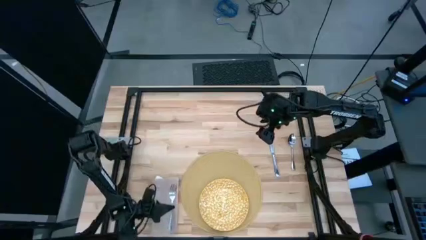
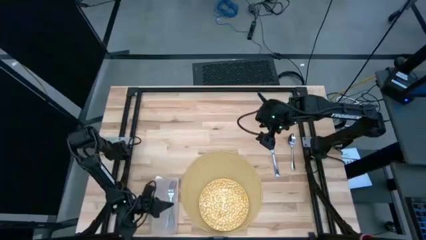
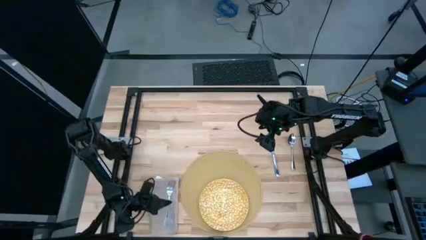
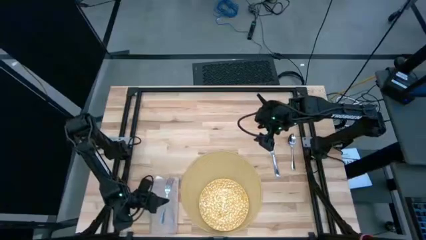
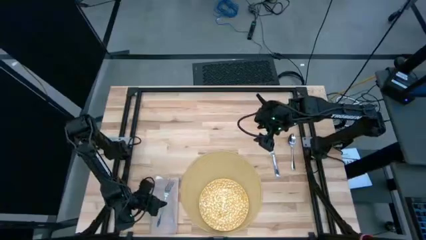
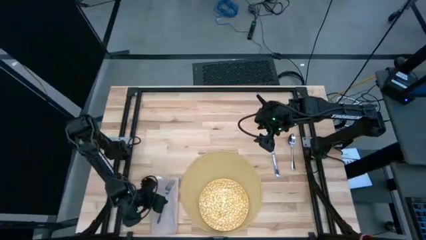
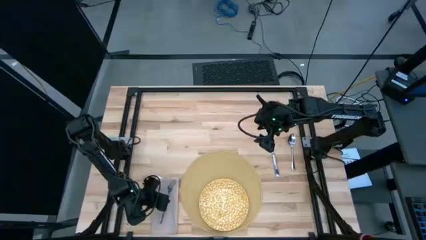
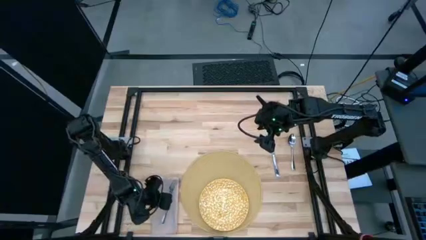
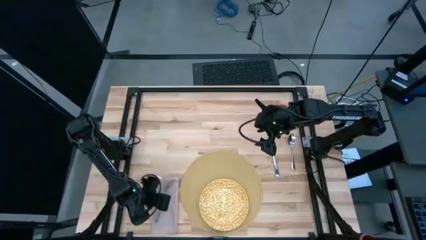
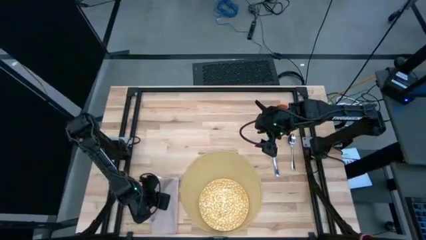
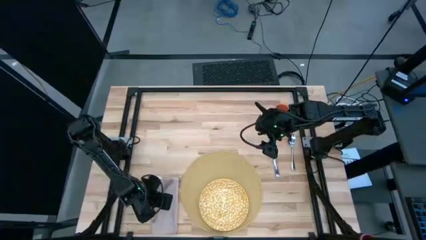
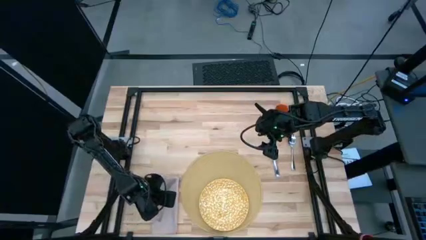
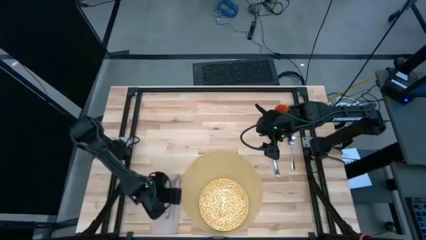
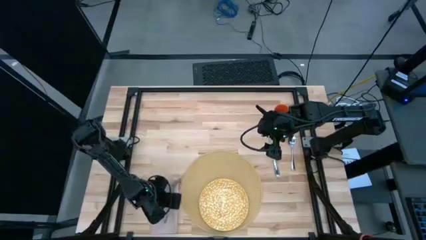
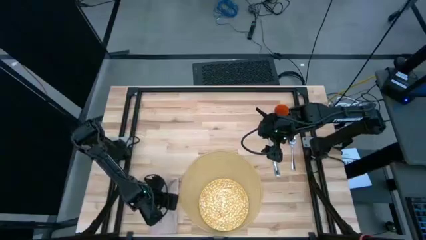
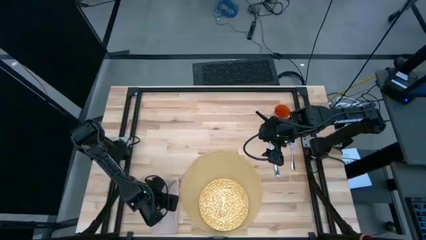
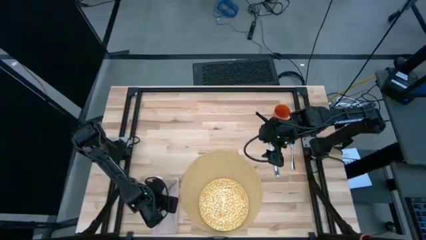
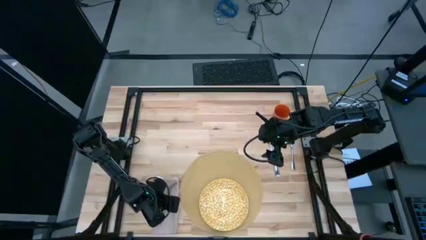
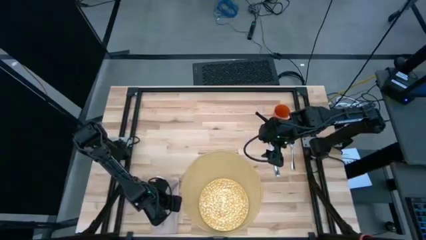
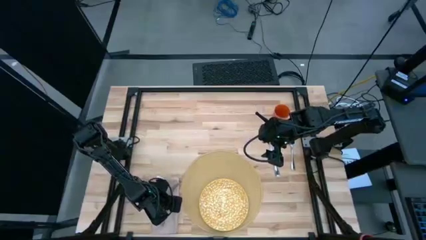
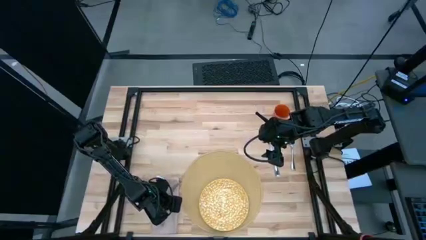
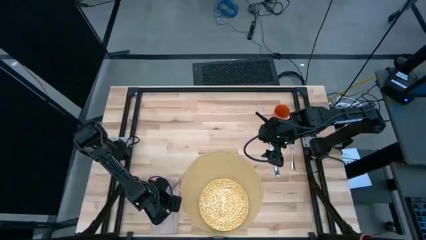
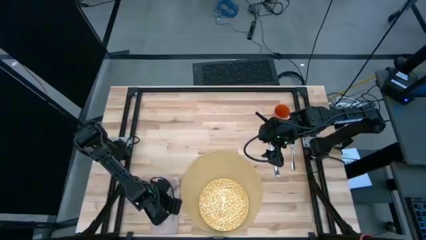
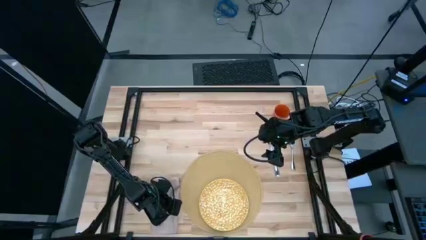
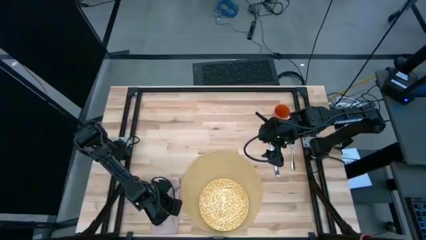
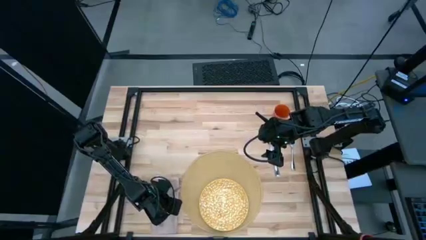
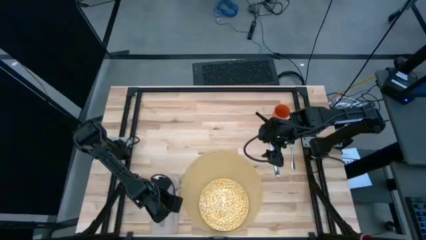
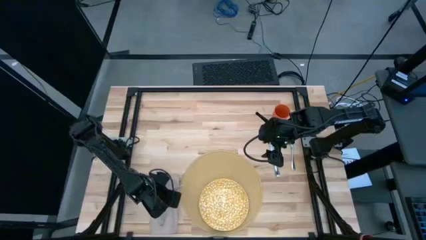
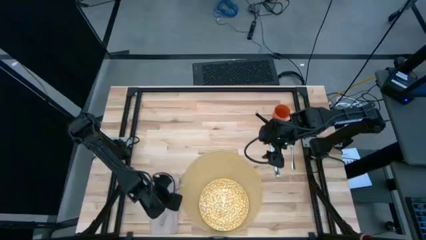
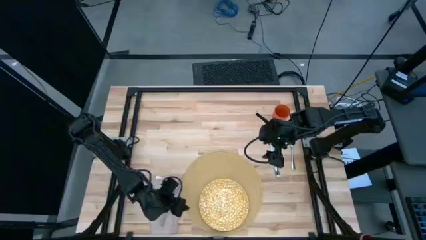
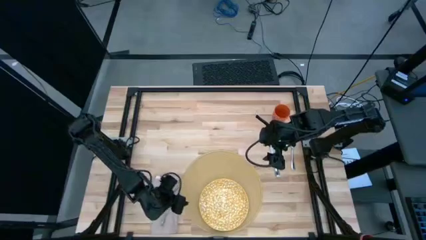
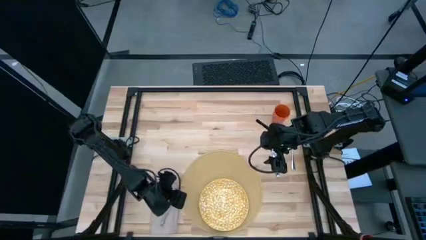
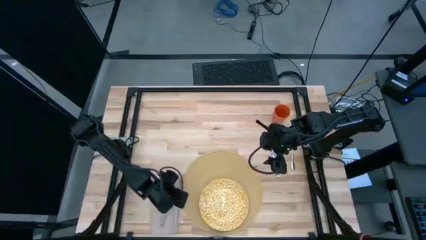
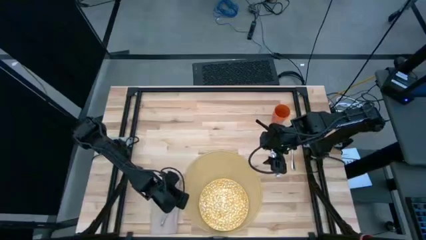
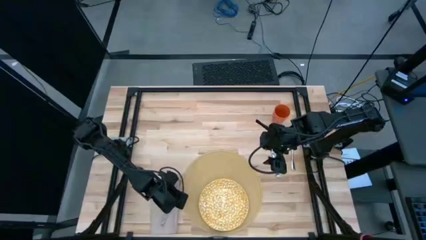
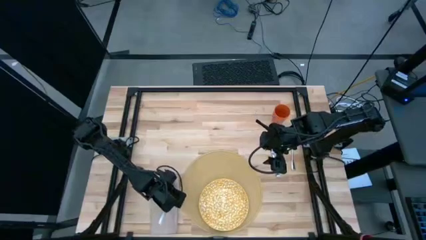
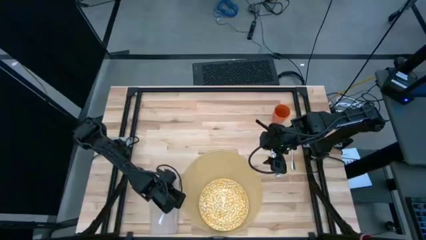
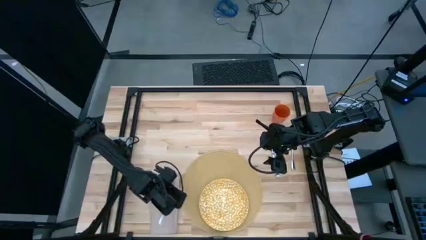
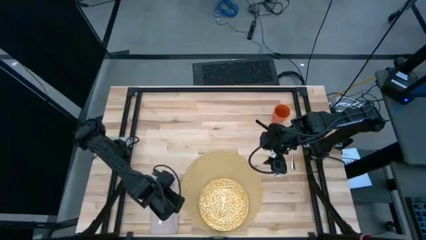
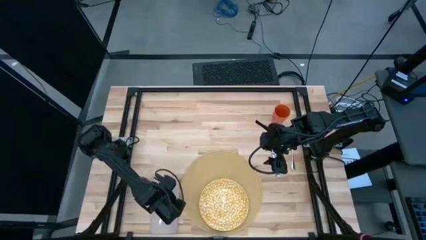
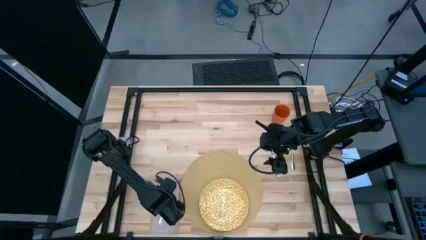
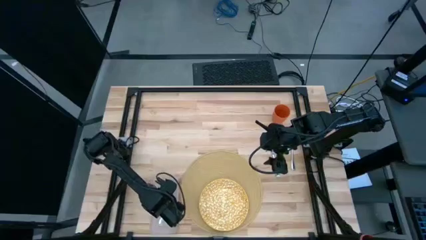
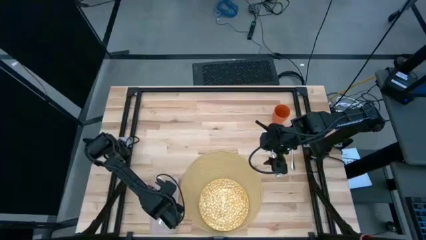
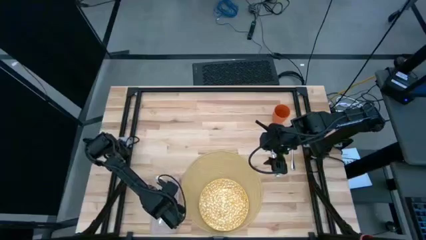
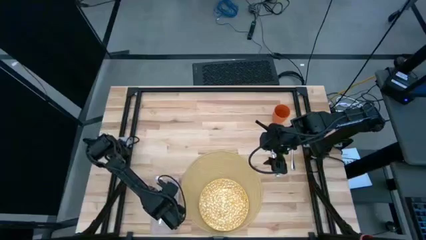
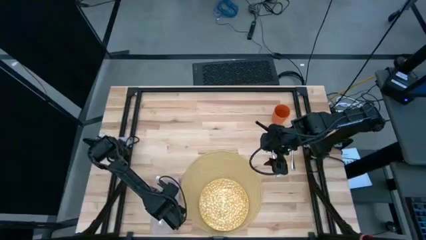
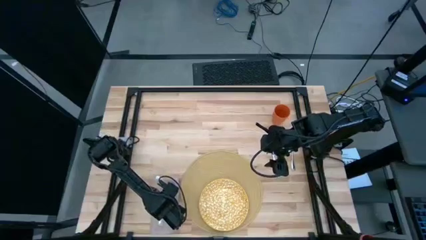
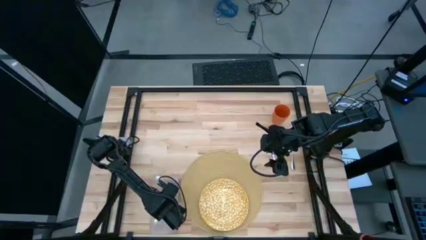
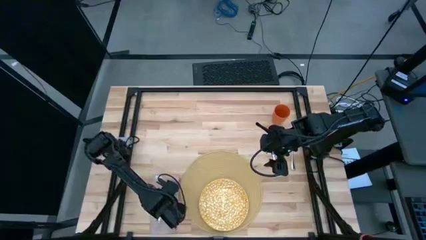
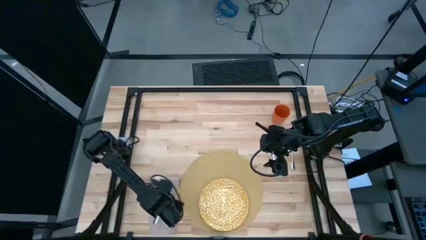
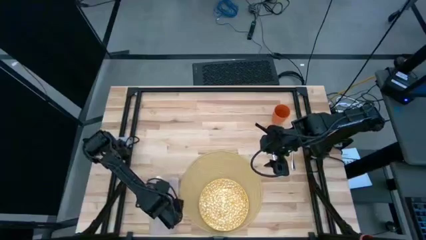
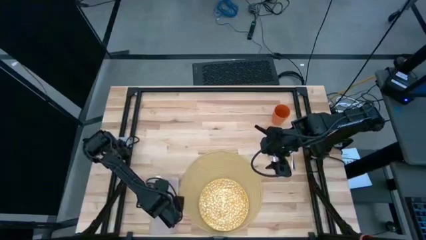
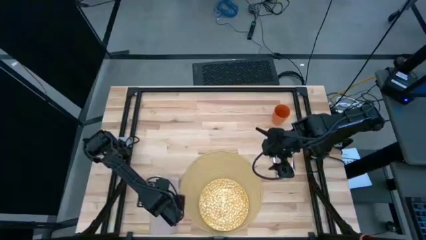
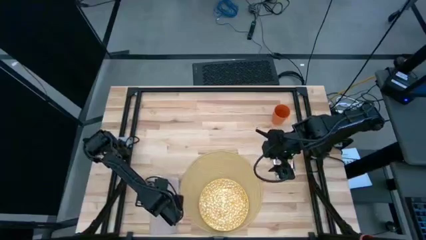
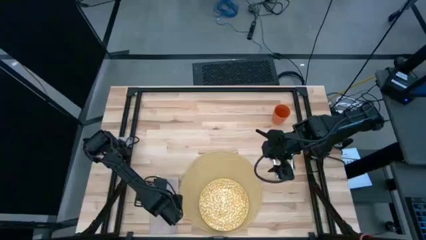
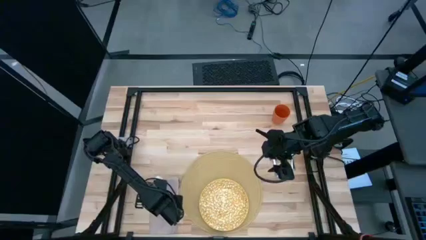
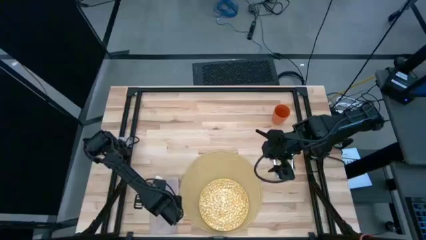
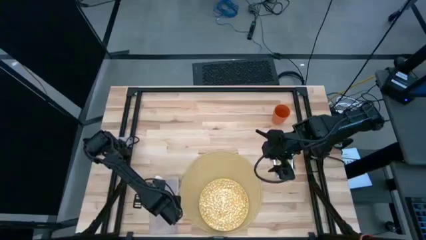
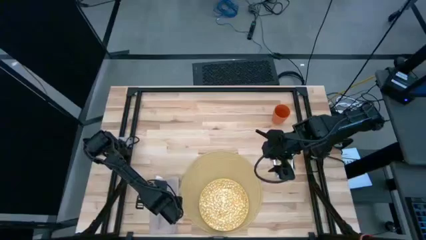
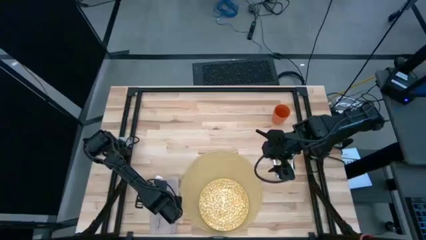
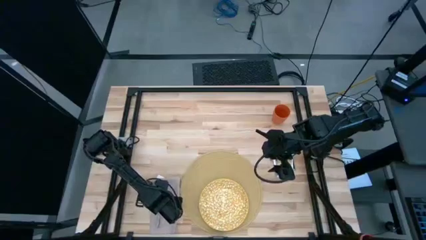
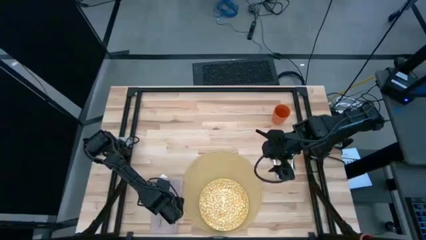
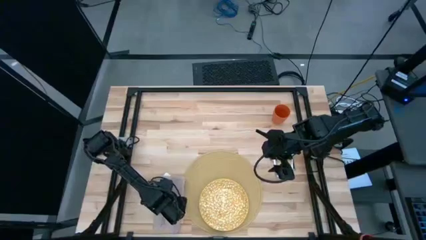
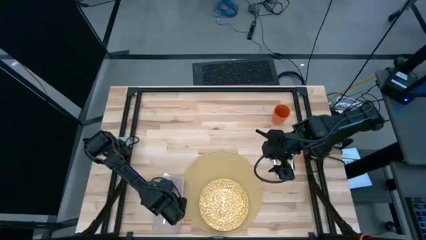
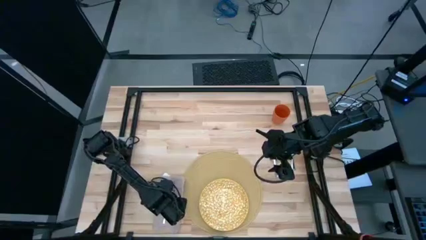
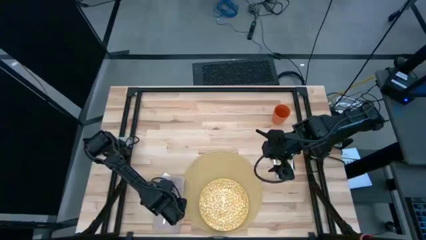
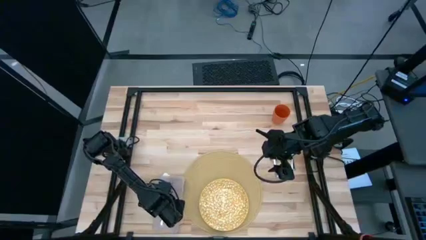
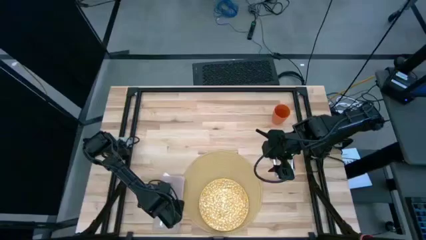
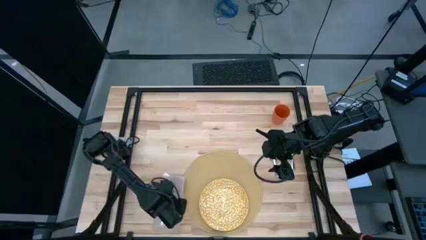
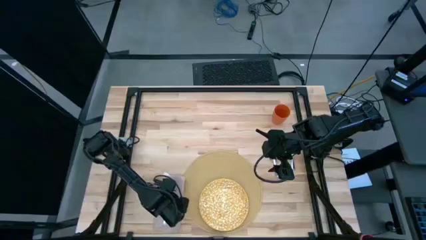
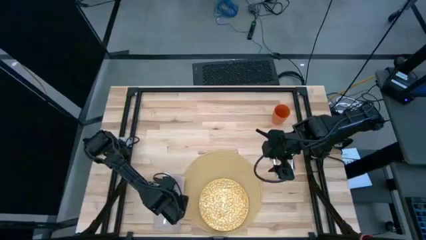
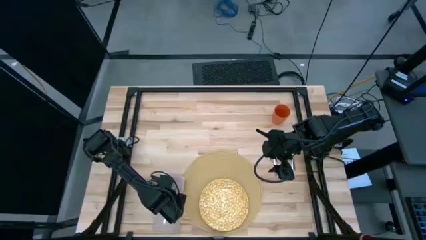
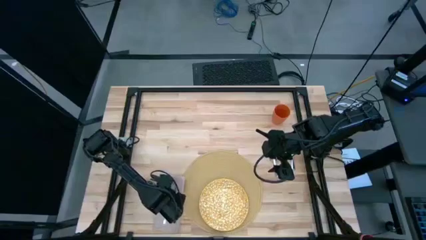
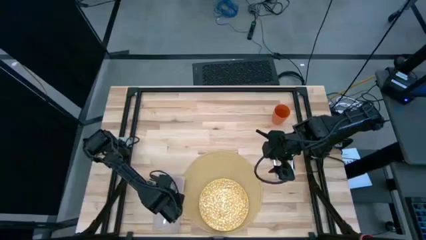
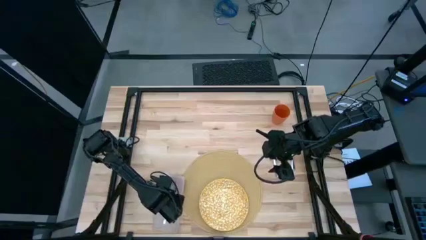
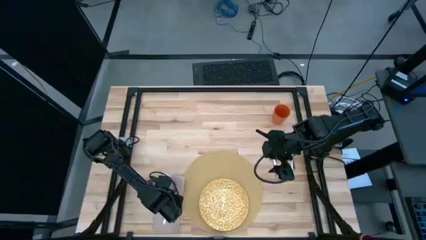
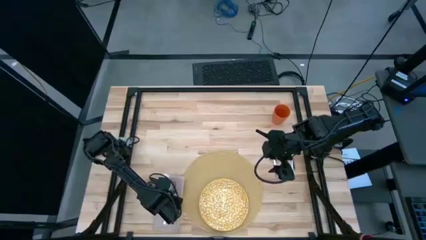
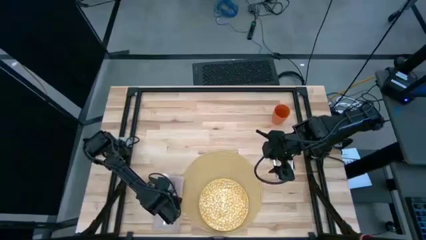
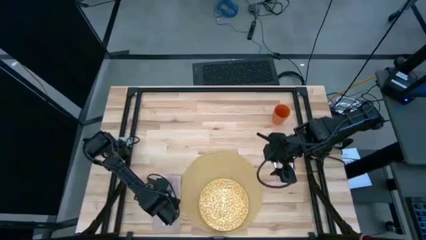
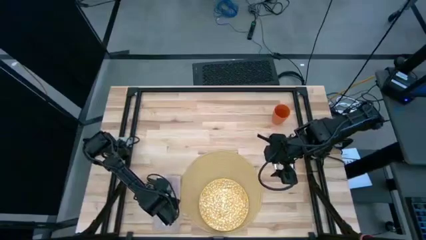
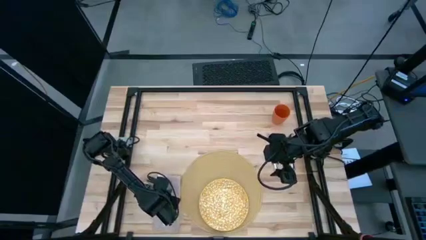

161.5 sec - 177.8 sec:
Task: Set table place
Put the fork on the brown table napkin
